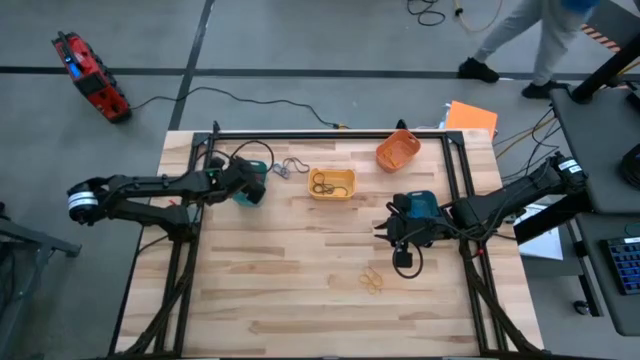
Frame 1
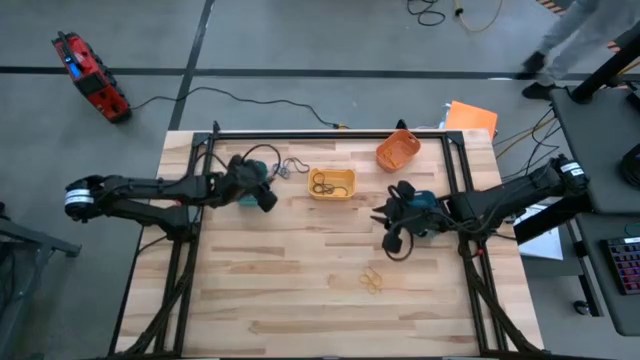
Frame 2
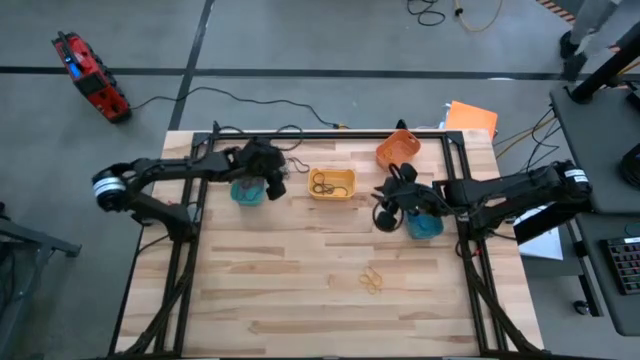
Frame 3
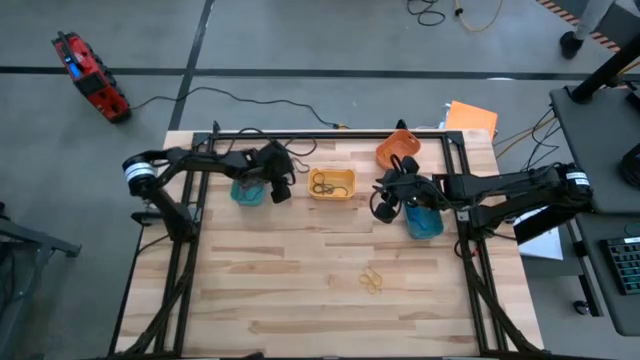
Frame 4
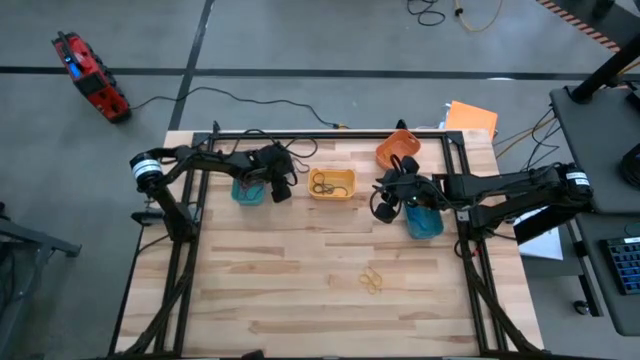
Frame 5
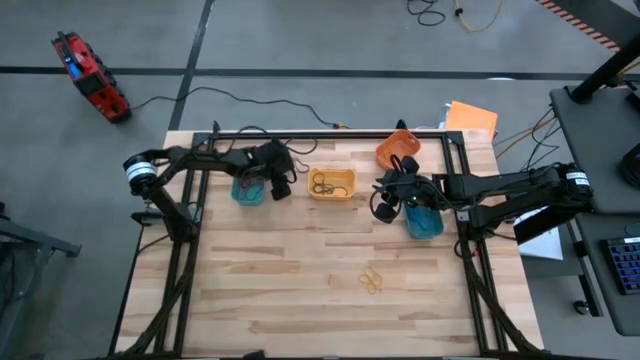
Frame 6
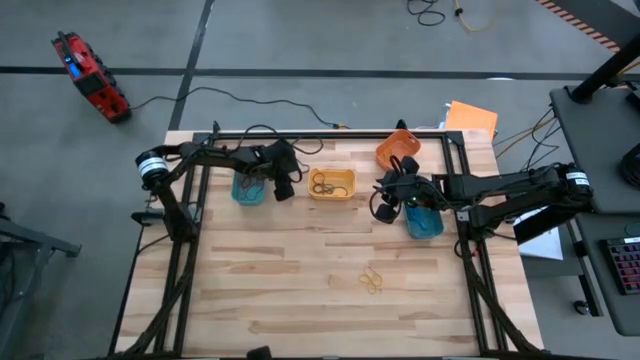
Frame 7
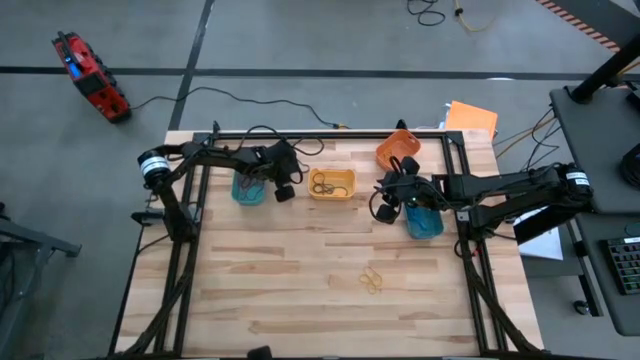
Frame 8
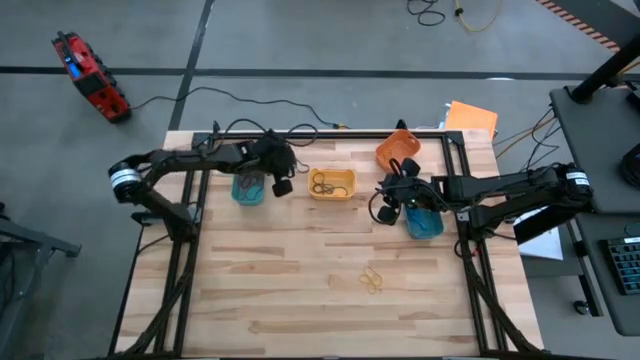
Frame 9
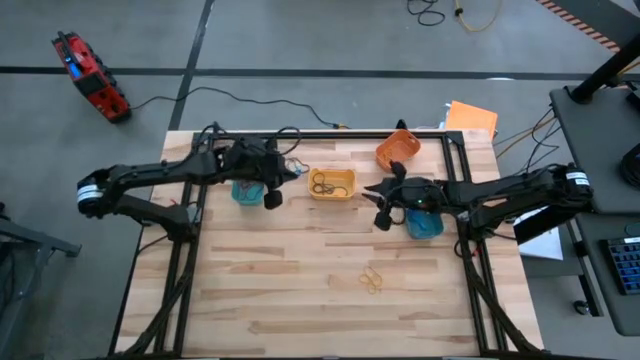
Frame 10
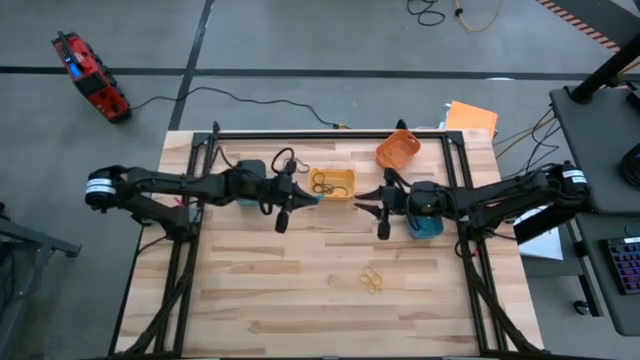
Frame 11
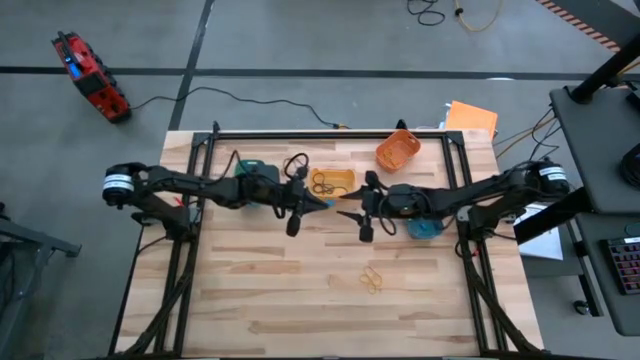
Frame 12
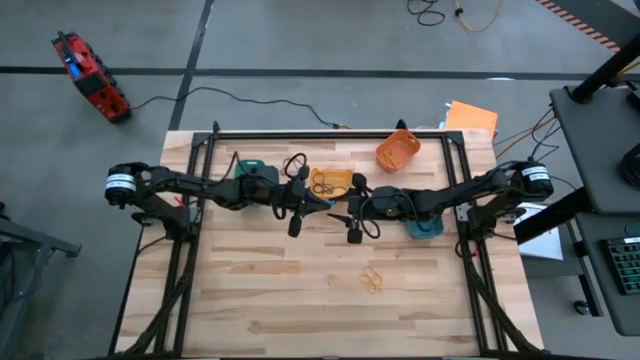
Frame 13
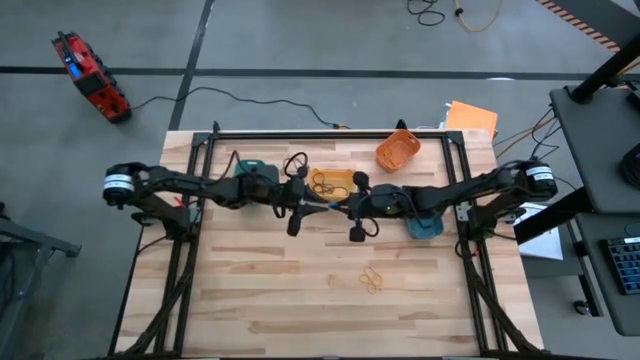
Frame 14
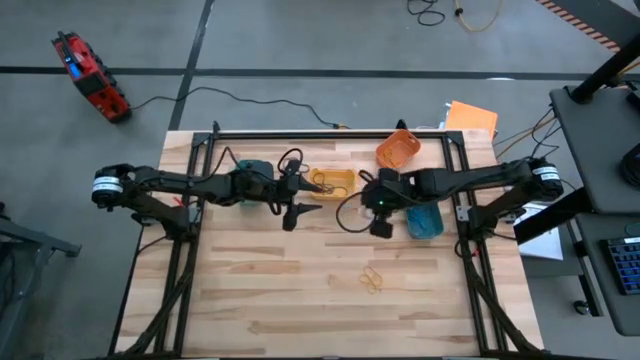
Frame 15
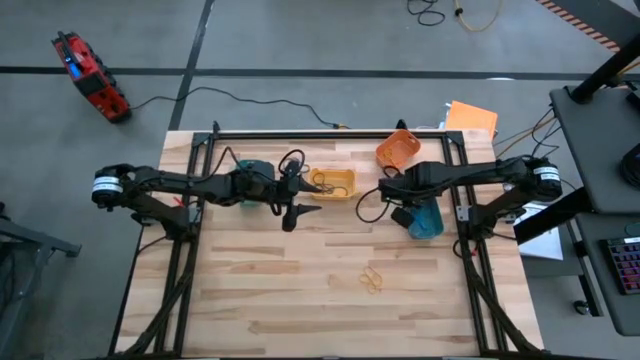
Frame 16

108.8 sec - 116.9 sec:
Task: Sort rubber bands into baskets
Put the blue rubberband into the blue bin

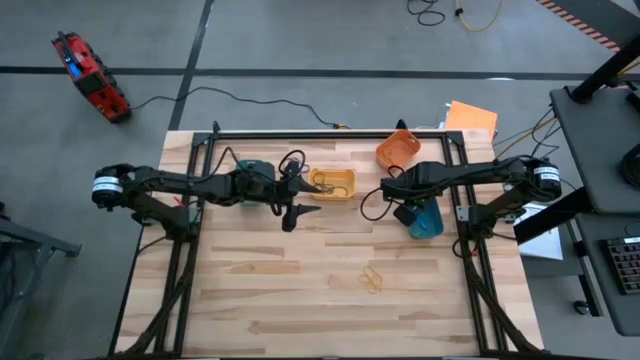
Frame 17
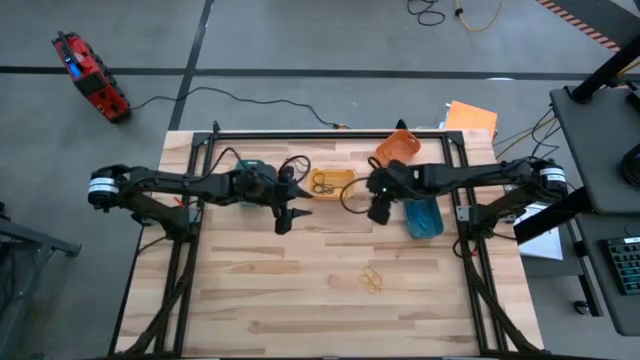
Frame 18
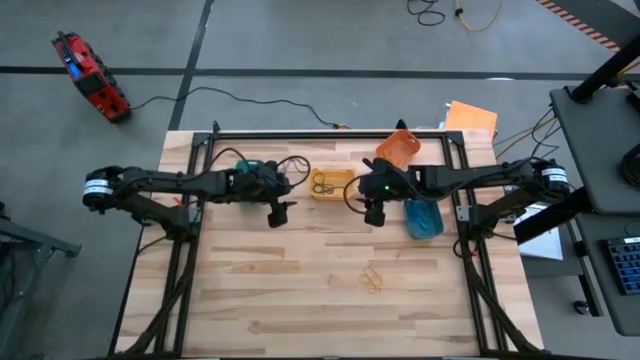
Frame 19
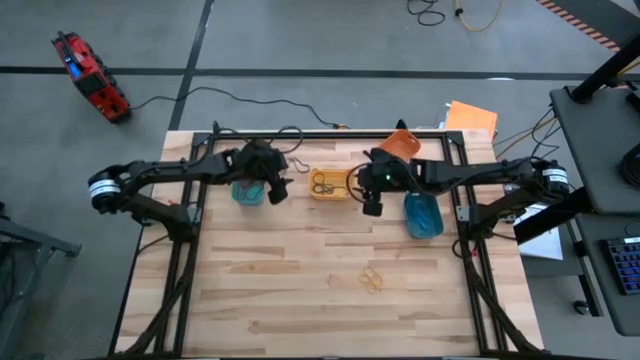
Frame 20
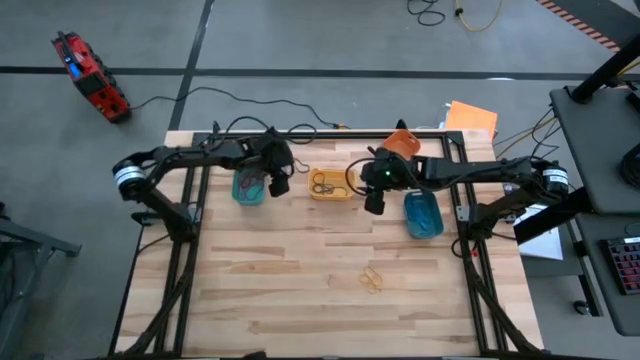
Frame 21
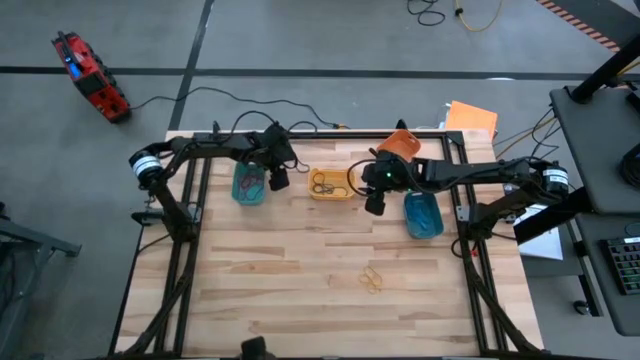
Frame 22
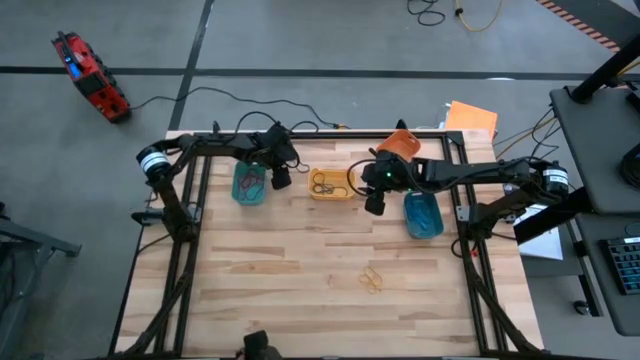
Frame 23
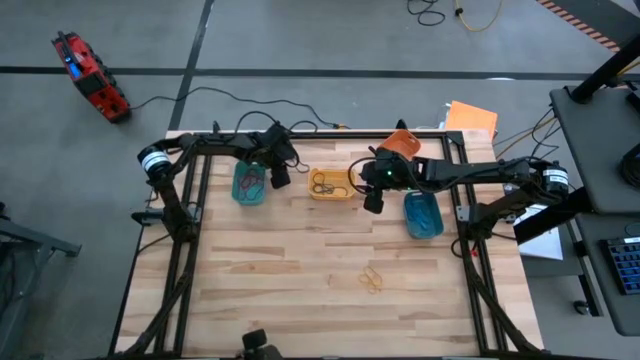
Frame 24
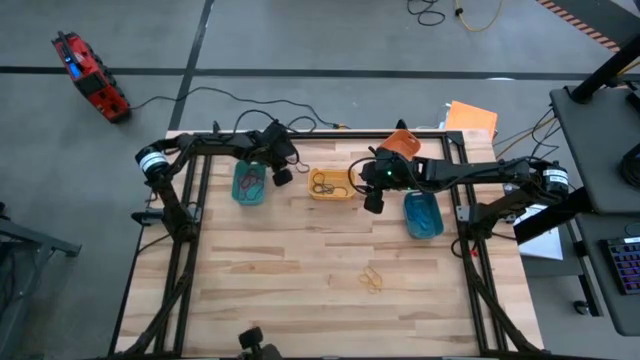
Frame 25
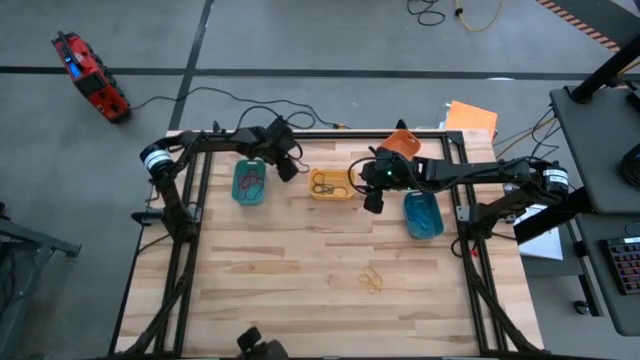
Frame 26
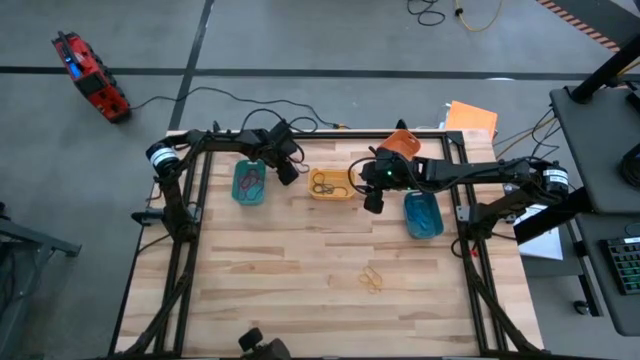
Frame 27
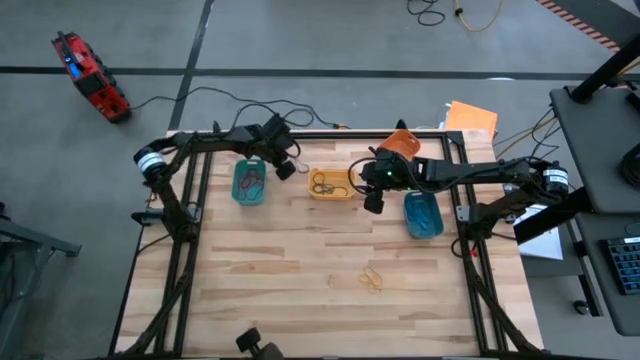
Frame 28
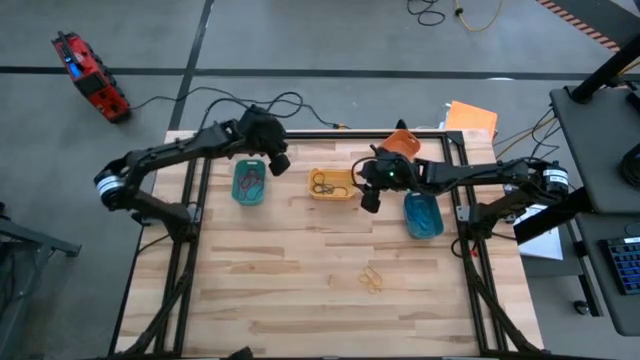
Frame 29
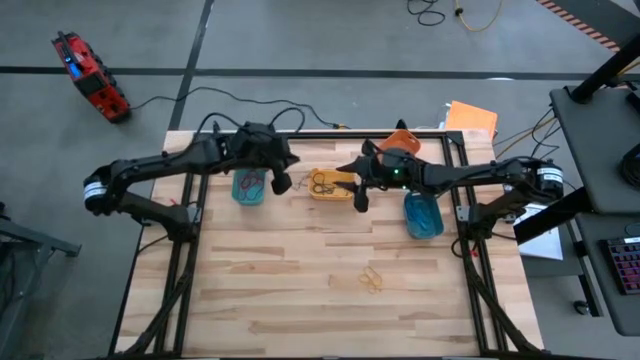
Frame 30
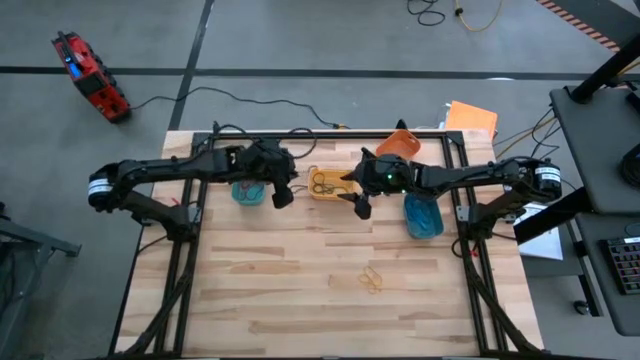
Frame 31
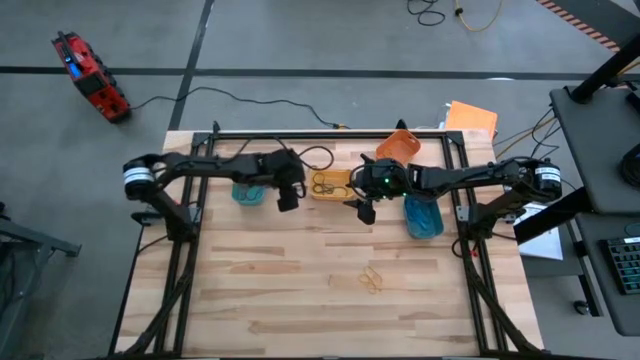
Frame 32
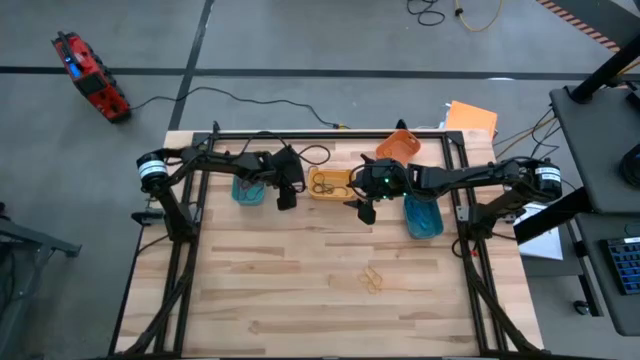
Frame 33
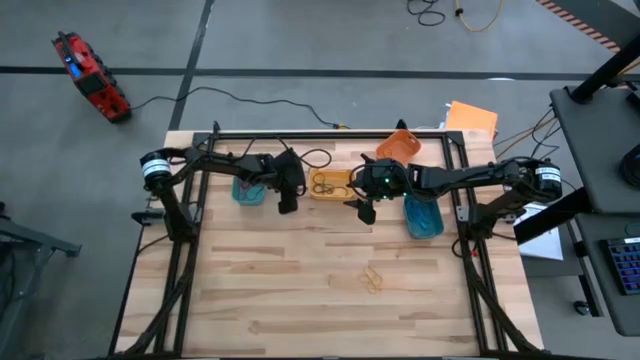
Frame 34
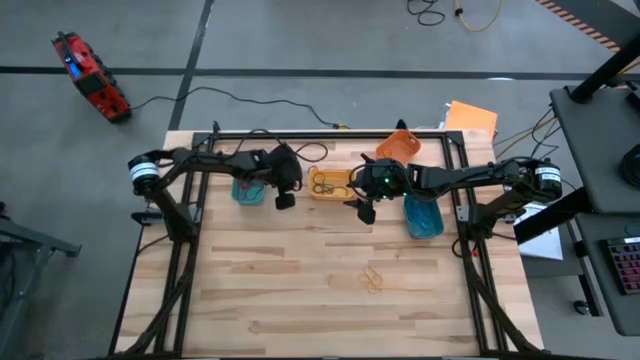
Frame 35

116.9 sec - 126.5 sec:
Put the black rubberband into the yellow bin

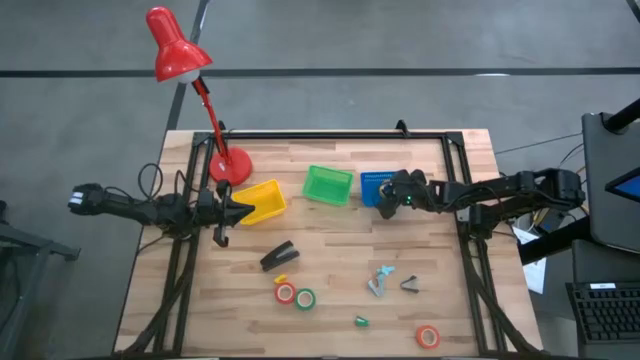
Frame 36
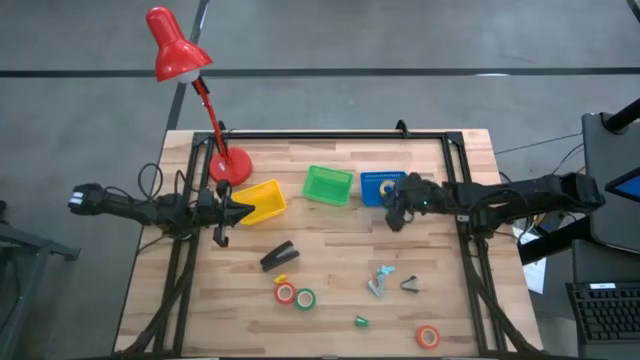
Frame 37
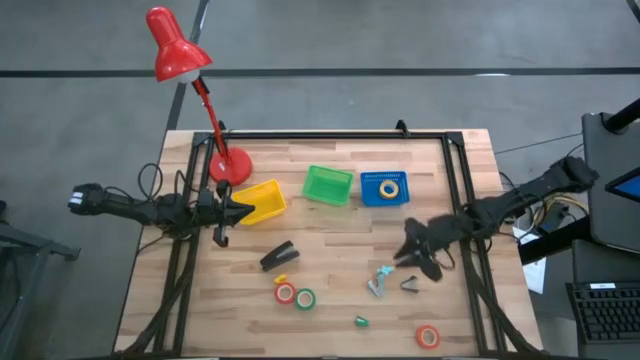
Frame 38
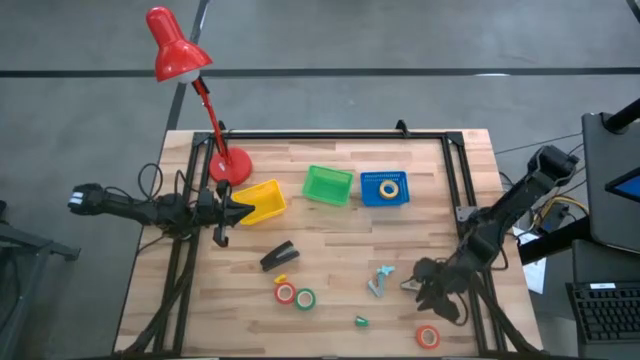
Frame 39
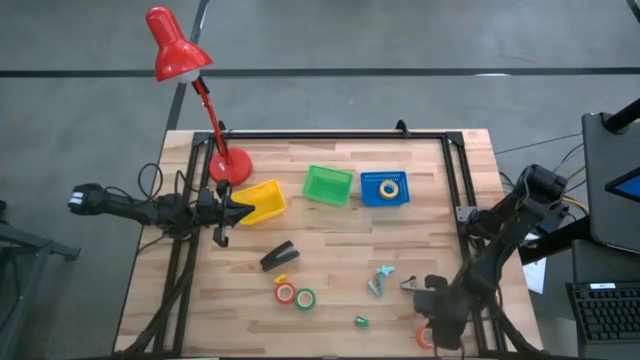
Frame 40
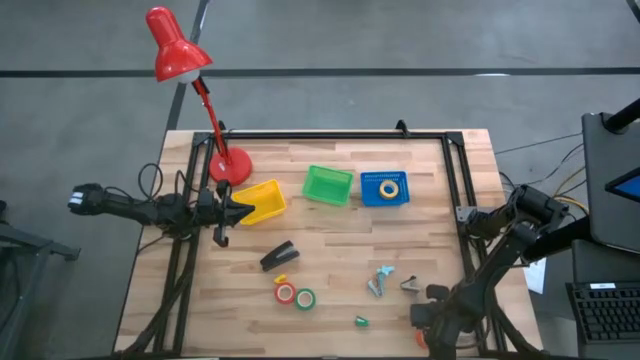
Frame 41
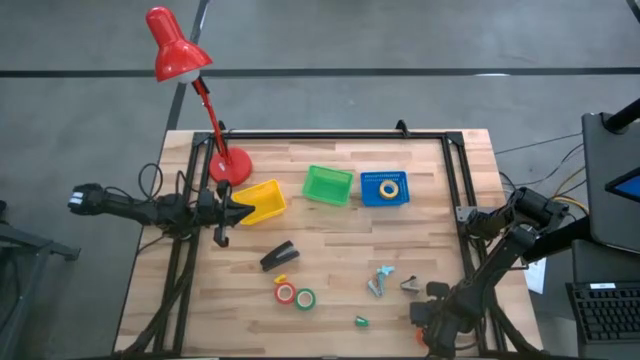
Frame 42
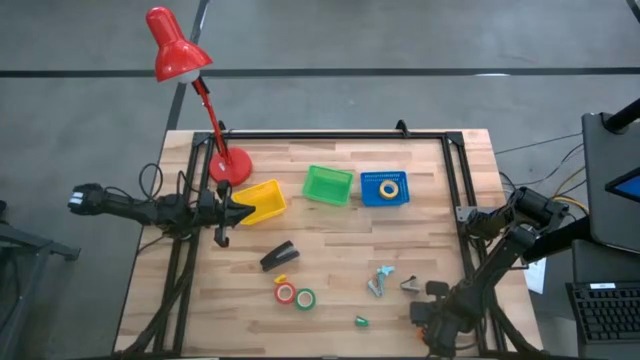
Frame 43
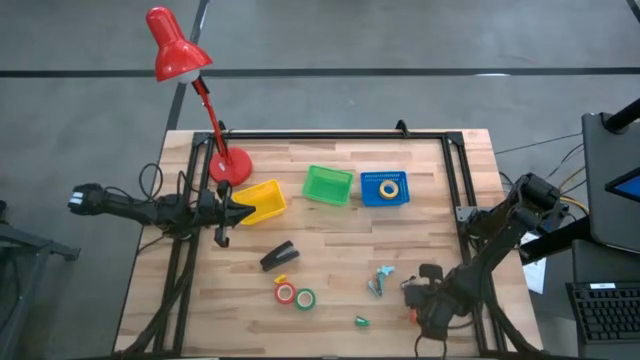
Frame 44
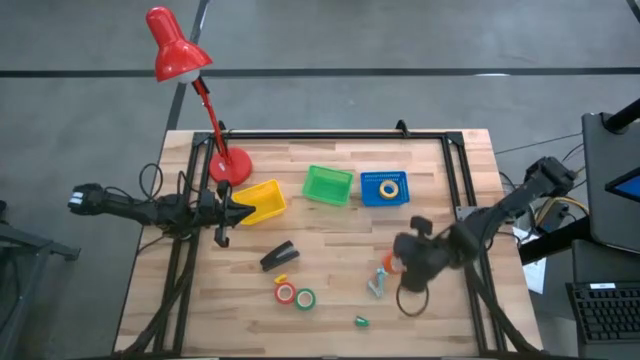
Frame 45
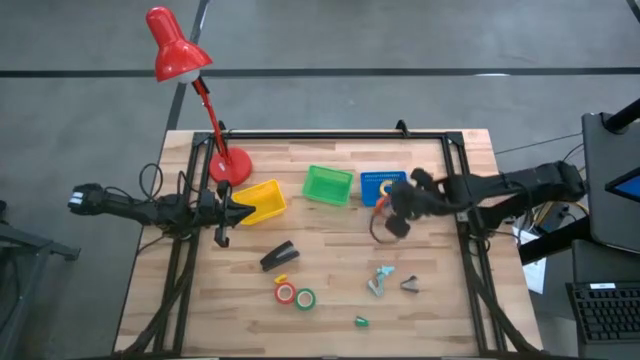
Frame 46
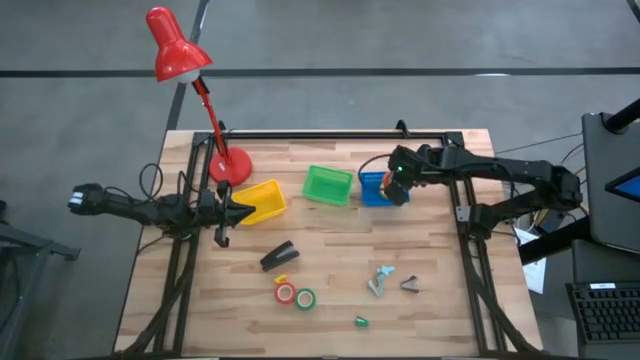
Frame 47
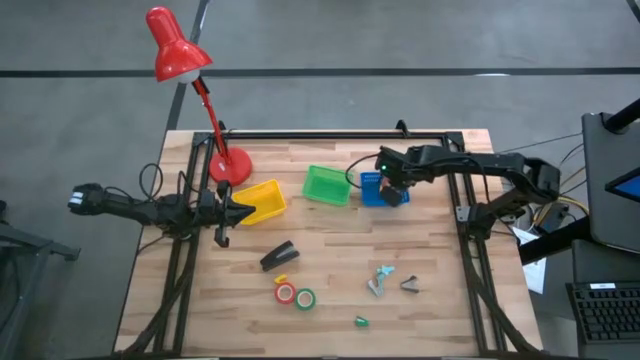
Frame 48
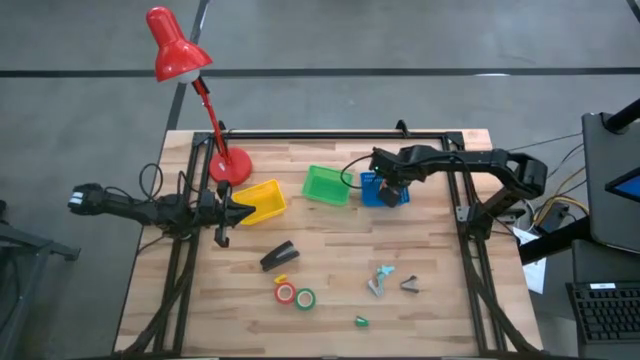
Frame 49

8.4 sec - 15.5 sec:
Task: Pick and place Stapler, Stapler remover, tape
Put the orange tape in the blue basket
